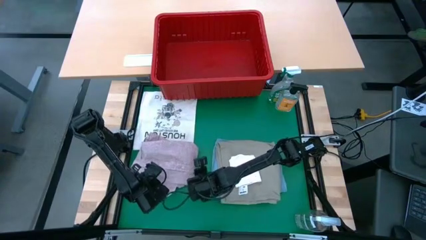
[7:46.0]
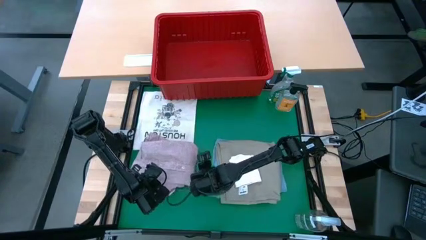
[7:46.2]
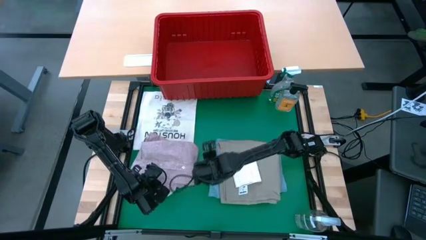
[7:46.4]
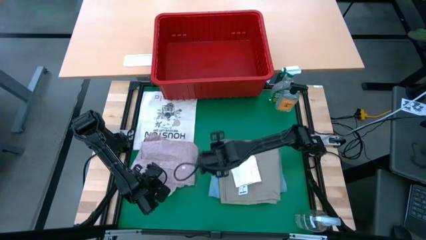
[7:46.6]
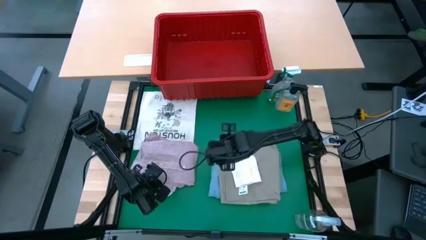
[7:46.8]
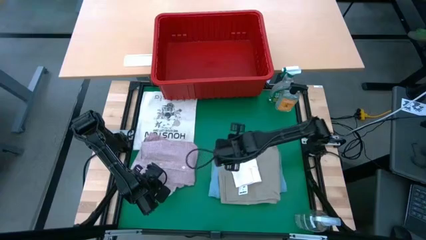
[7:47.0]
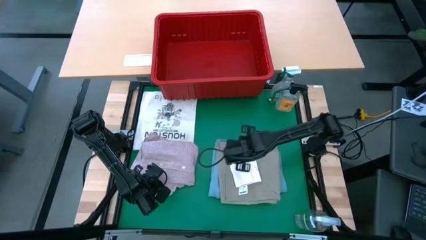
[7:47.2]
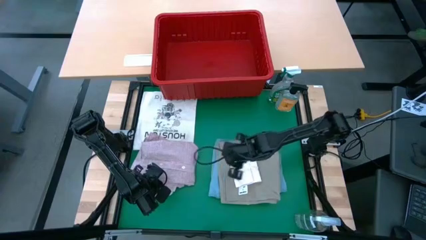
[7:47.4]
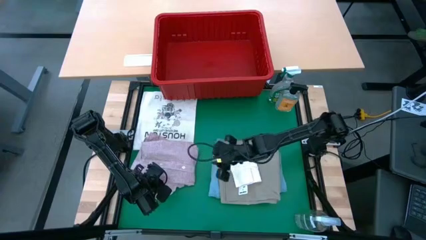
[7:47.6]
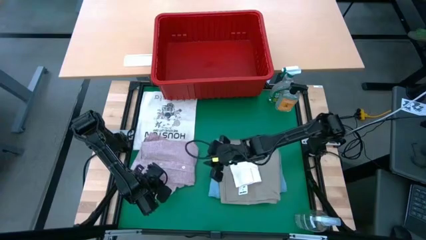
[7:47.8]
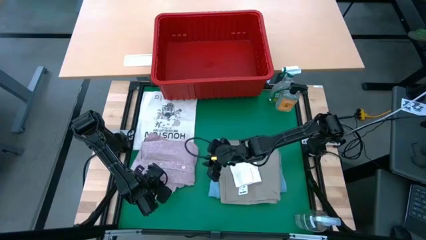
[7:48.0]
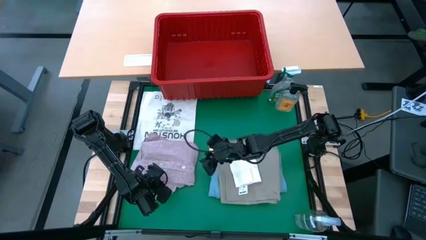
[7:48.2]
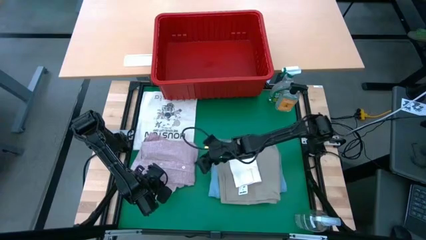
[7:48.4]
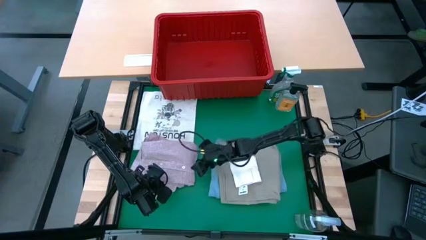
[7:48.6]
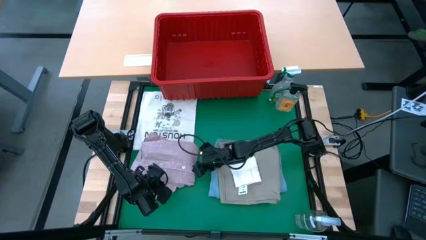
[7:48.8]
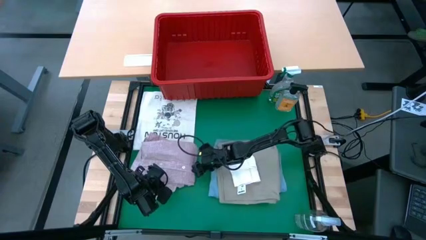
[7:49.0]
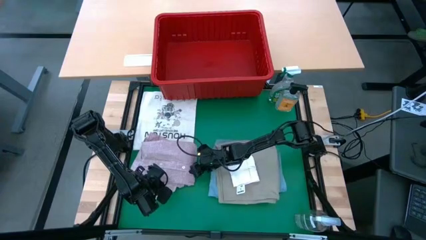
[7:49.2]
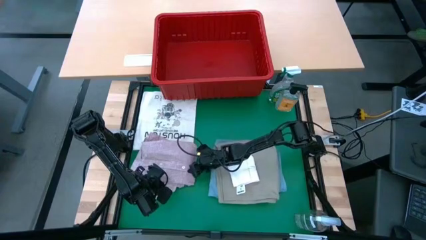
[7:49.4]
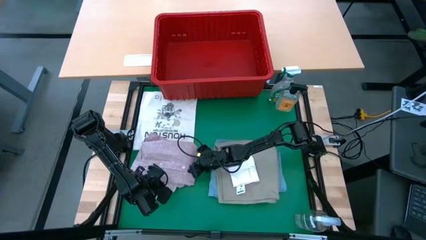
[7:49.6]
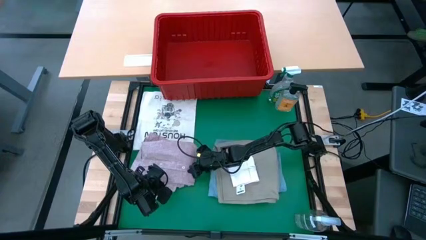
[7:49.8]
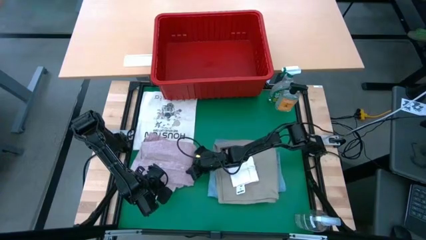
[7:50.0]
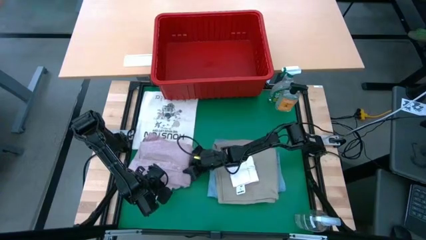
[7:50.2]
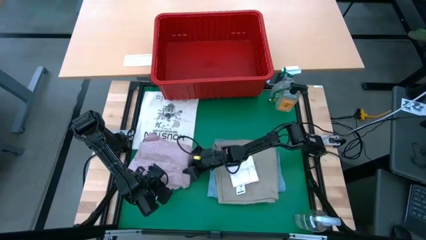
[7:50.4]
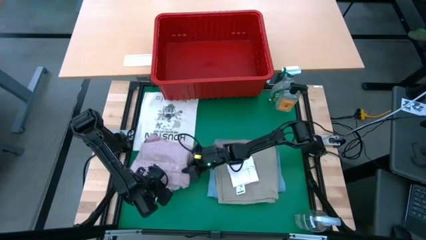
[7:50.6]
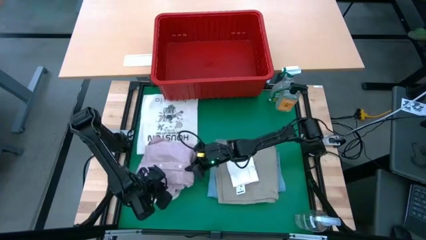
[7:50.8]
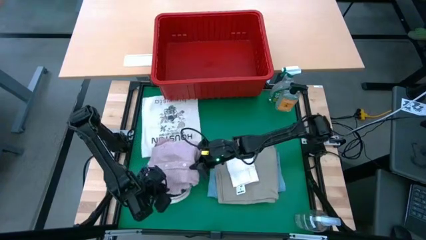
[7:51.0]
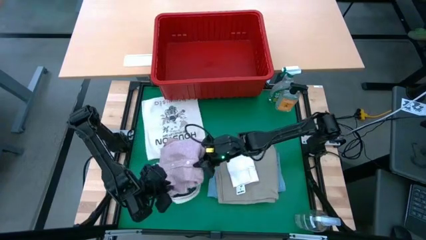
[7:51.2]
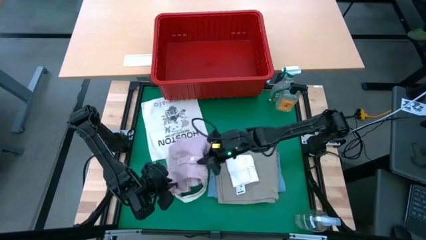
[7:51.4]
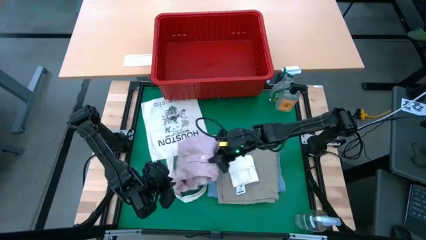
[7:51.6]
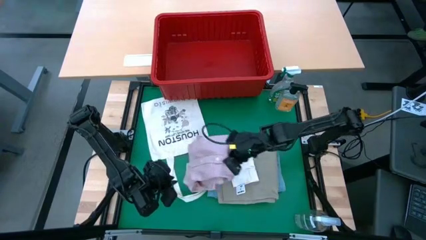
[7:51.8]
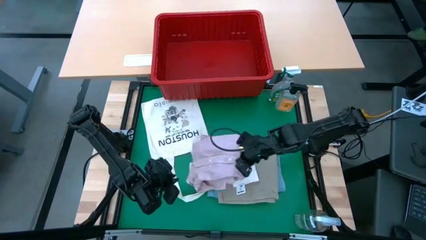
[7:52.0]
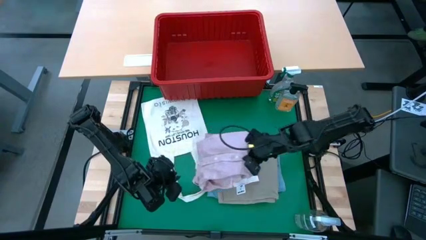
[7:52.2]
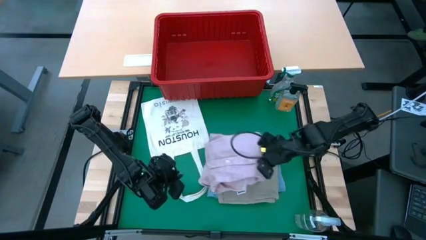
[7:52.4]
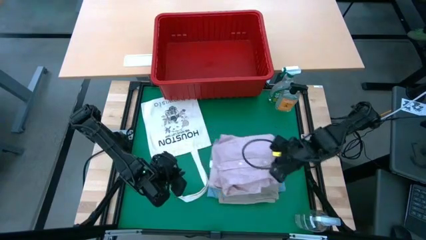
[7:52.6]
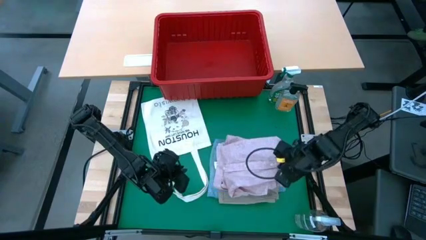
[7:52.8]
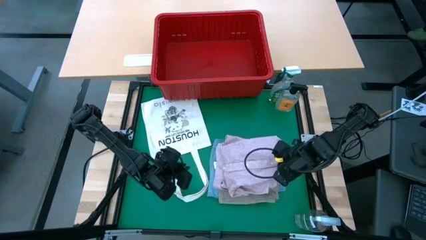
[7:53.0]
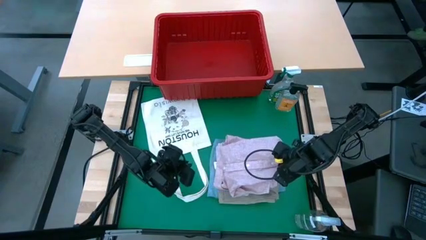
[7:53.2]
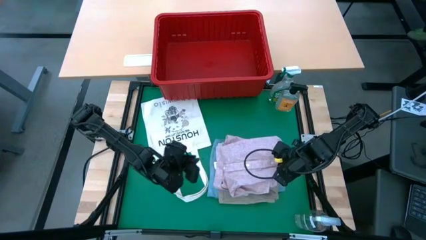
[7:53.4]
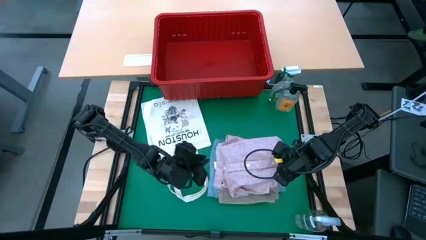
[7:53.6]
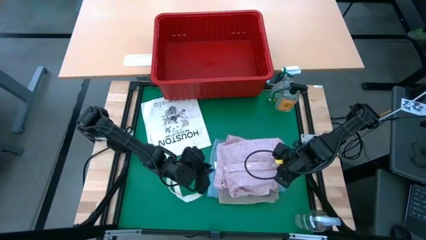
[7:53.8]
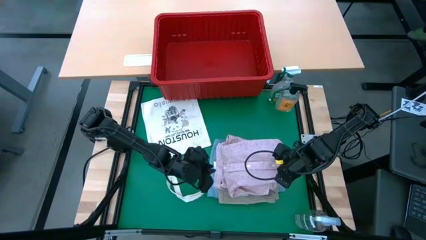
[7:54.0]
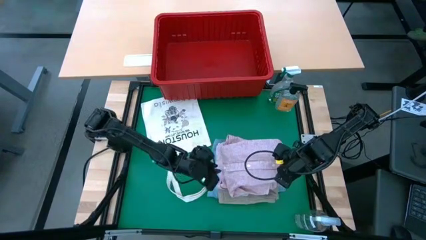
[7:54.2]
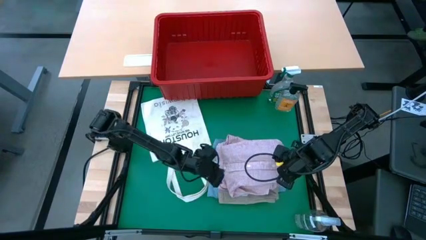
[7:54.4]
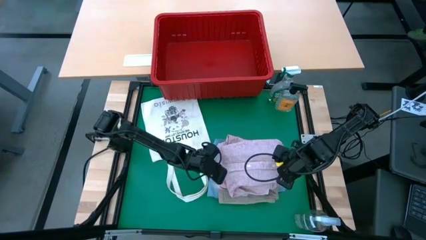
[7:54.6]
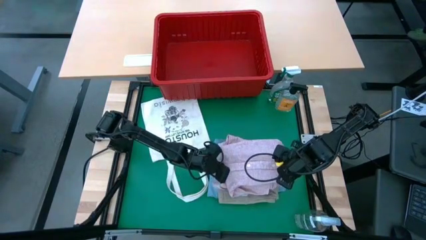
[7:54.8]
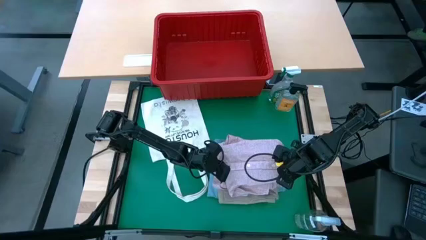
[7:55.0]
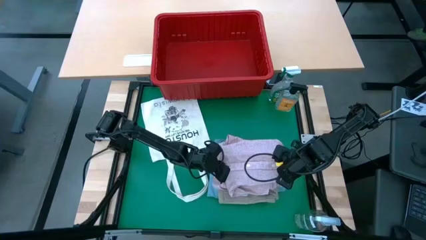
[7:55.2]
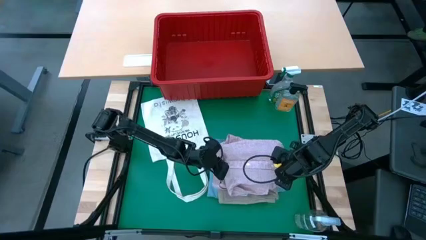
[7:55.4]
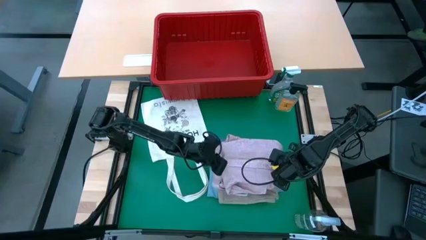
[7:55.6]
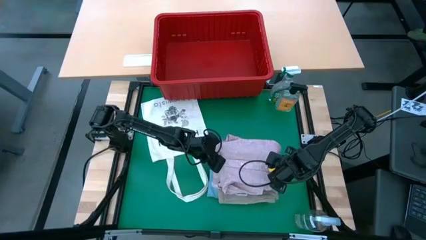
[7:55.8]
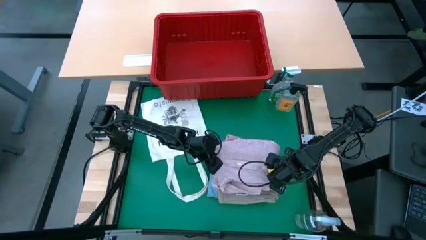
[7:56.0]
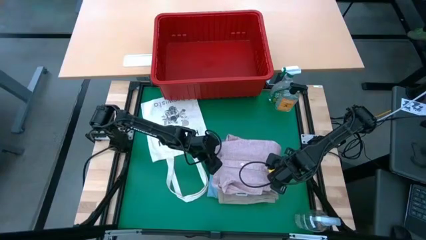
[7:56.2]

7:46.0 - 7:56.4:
Task: Fold laundry
Stack the folded pink polo on top of the folded white underwear
